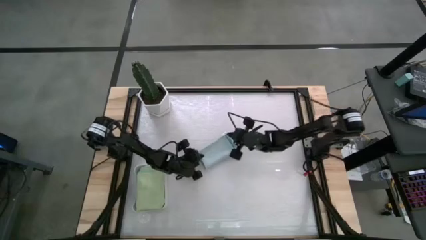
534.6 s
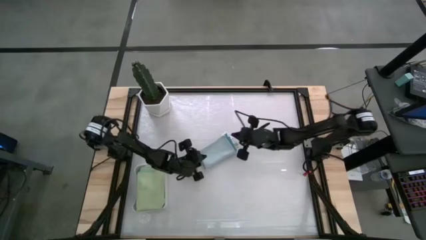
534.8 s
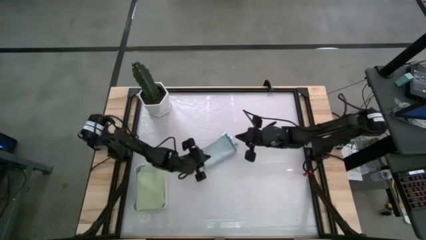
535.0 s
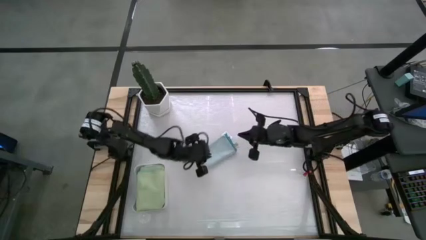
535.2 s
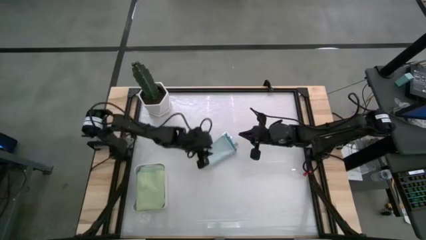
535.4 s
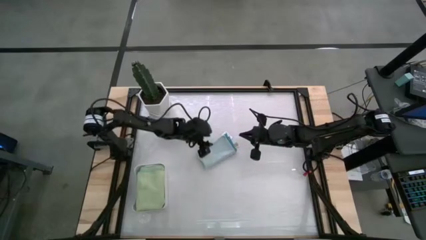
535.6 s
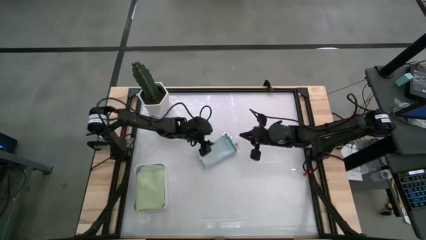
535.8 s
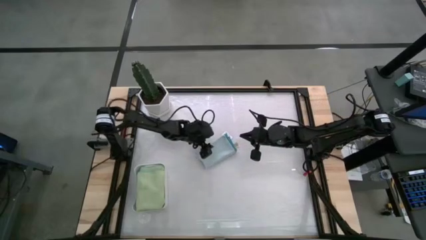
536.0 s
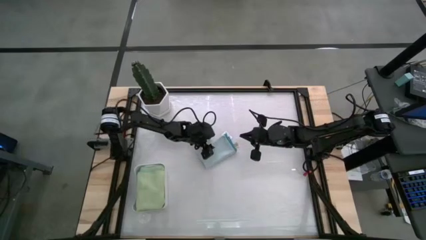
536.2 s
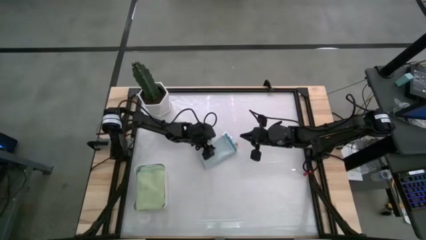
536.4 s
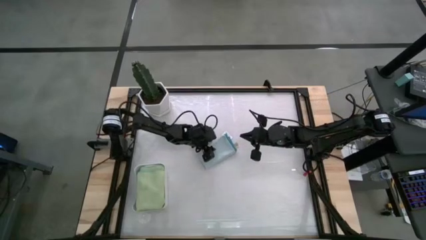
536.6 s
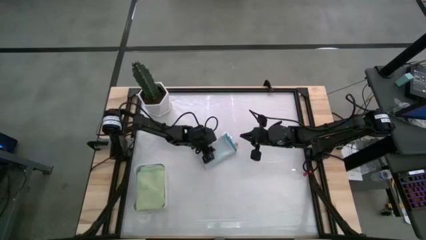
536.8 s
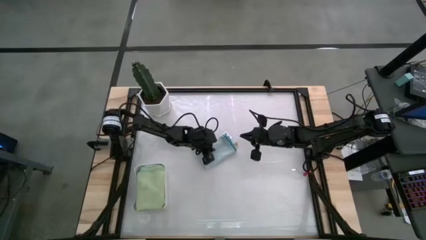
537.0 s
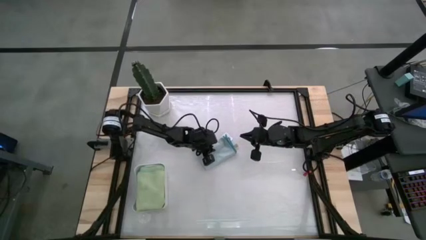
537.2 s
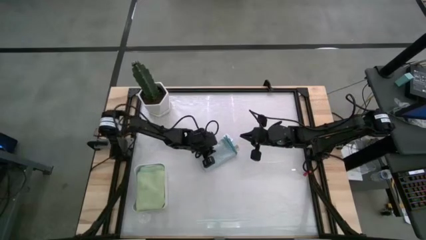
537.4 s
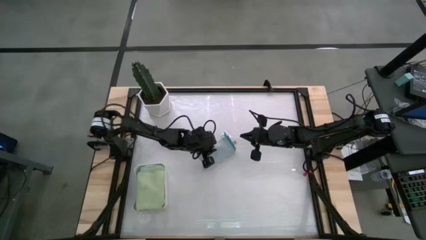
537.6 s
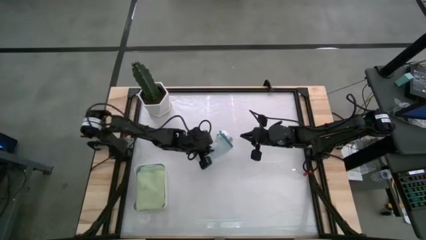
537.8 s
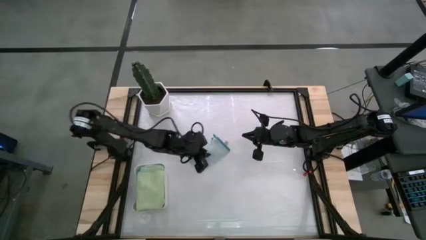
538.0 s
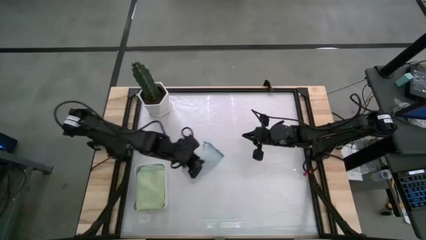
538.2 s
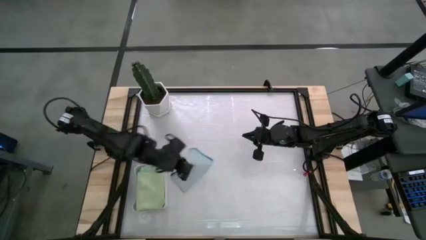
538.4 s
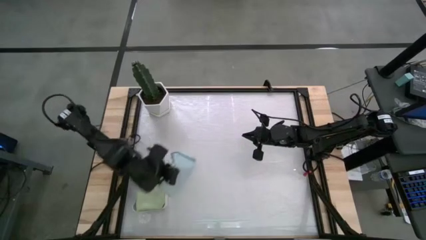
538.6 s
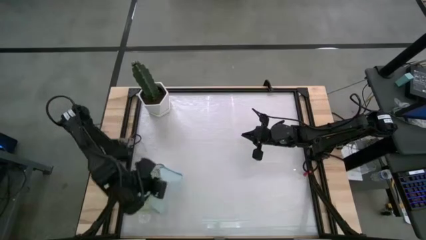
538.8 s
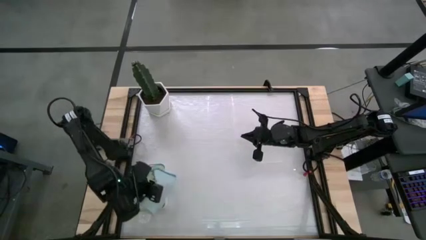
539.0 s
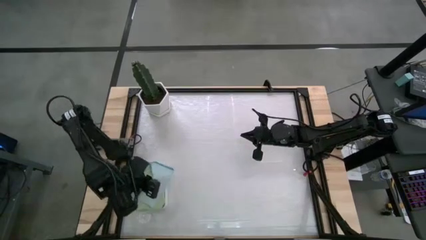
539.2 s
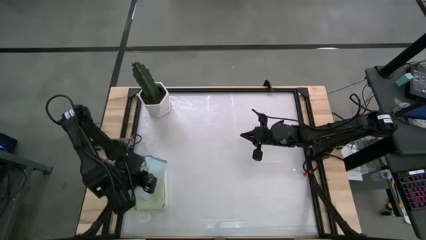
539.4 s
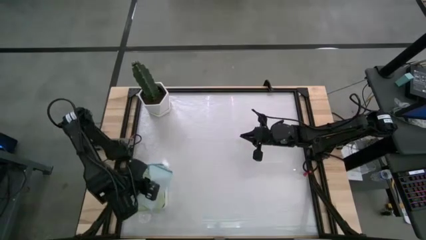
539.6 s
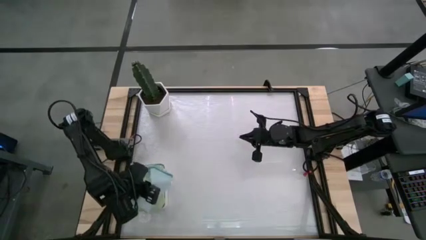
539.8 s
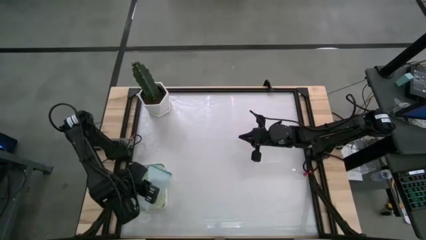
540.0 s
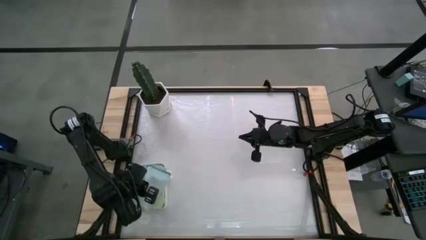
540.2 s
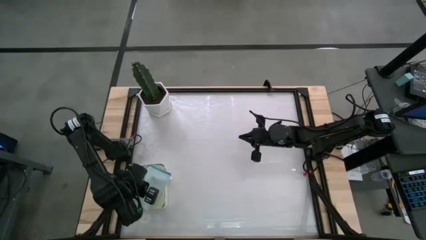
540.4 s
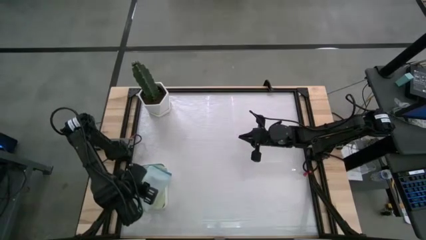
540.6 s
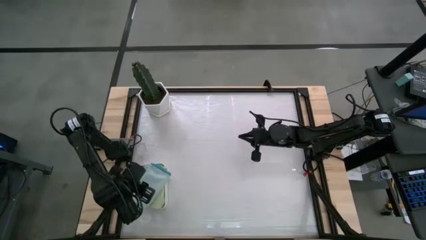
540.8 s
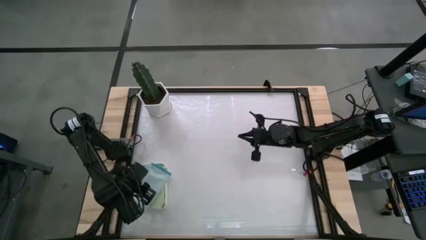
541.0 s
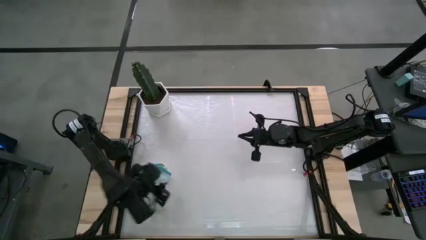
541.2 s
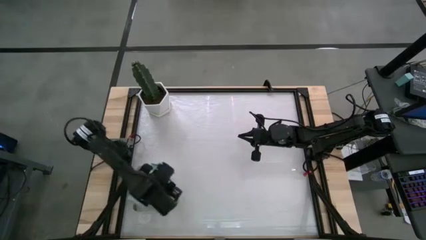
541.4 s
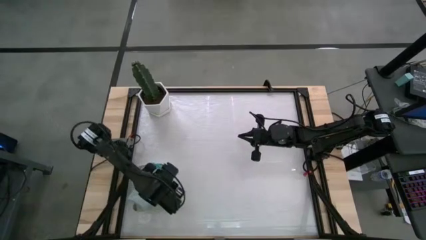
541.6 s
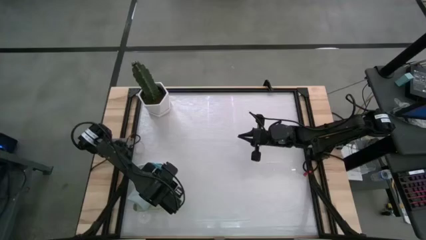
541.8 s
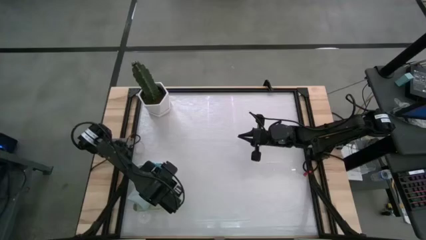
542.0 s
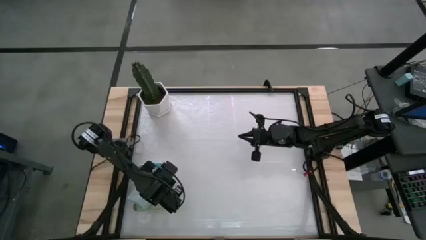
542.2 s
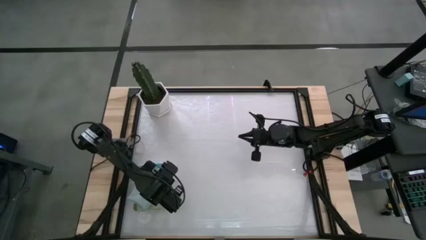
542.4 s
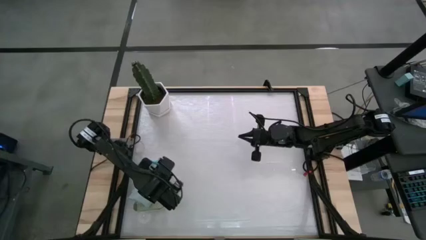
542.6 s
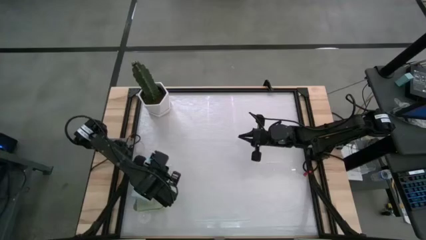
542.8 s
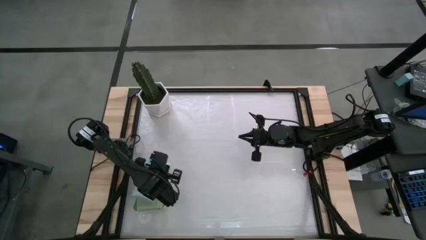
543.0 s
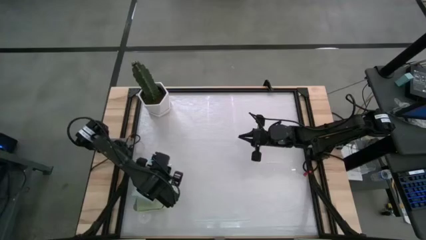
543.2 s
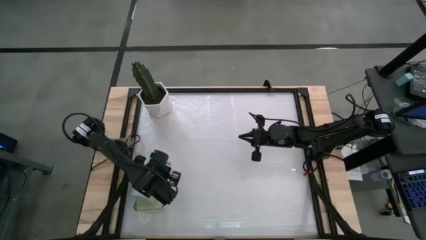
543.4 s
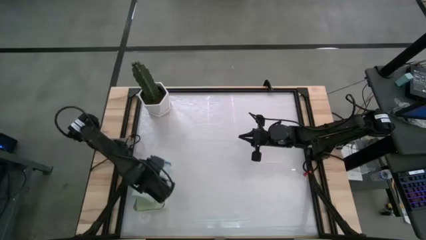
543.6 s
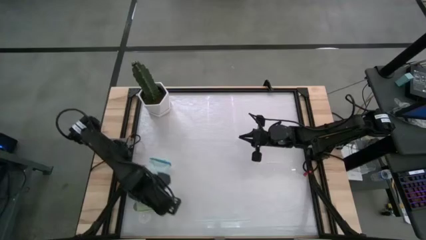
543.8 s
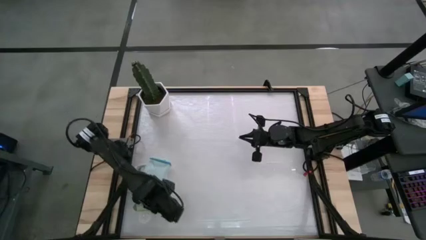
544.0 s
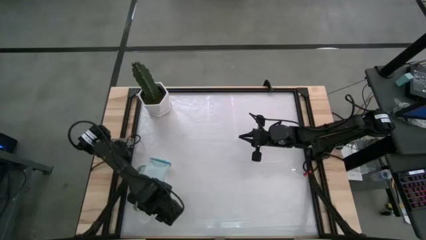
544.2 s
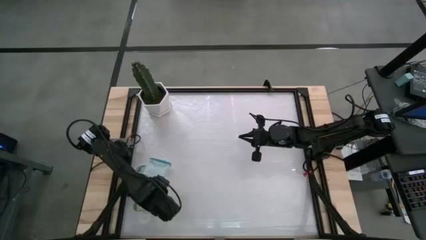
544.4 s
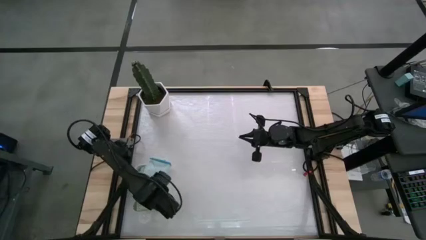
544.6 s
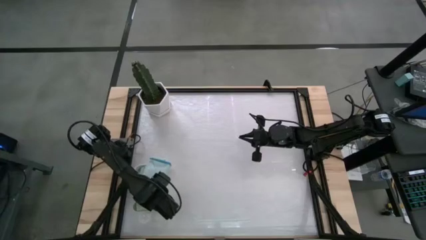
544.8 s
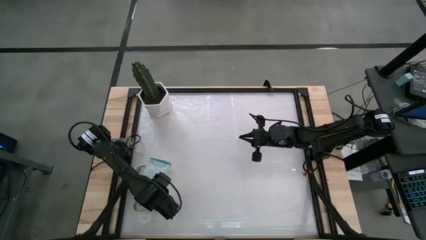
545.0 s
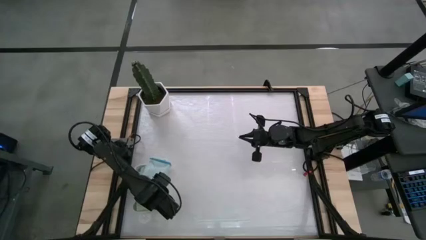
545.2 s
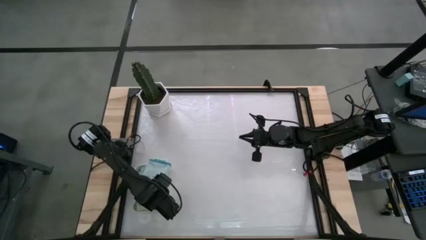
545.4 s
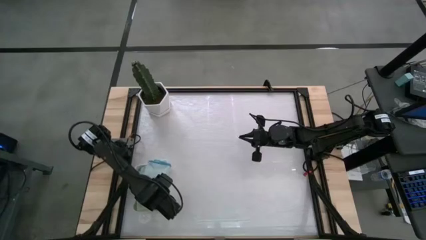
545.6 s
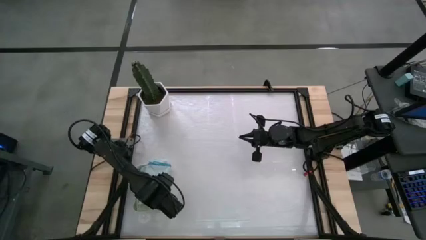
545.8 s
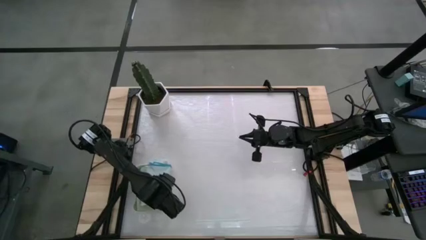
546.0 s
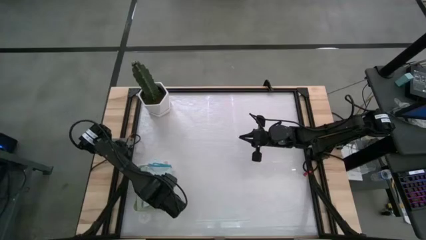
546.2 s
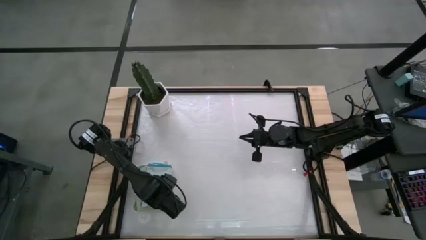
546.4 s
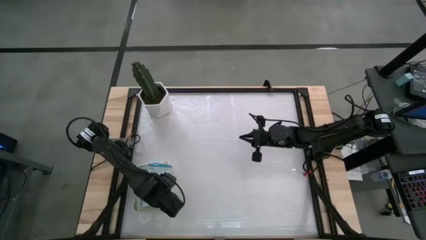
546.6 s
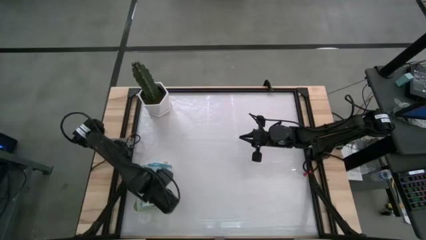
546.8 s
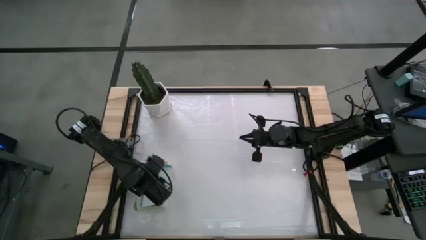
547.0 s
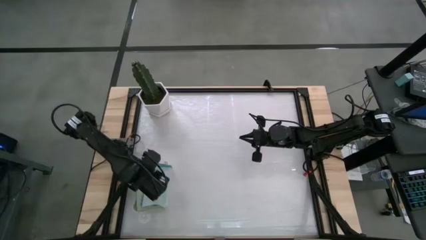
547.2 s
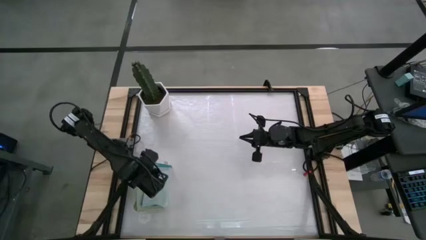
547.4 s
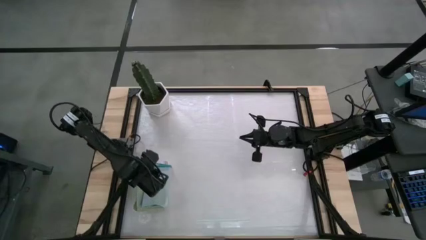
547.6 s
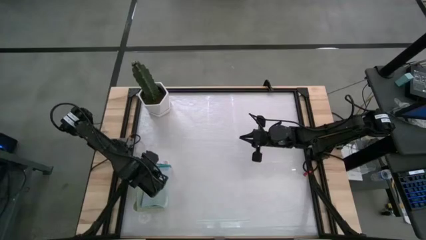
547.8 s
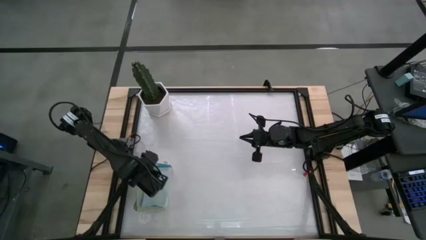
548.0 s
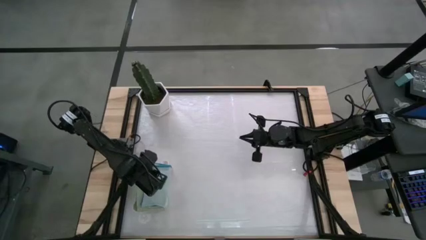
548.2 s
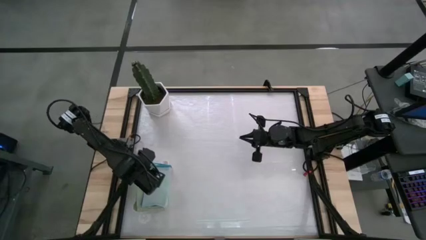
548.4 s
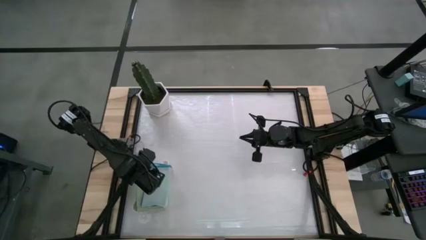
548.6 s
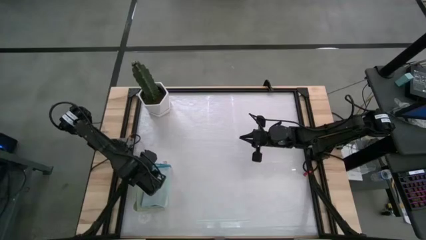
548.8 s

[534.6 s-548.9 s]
Task: Fold microfiber towels
Put the light blue microfiber towel into the white bin

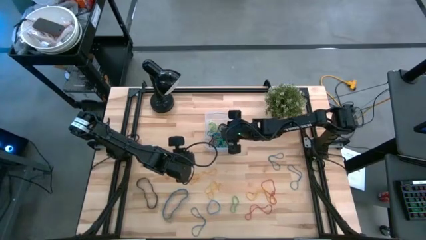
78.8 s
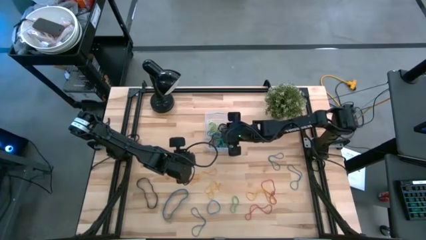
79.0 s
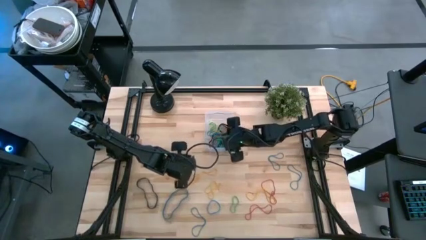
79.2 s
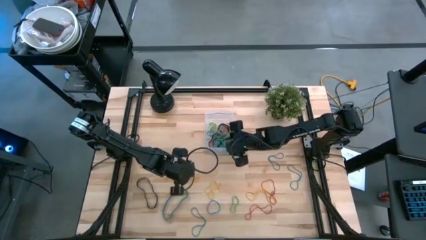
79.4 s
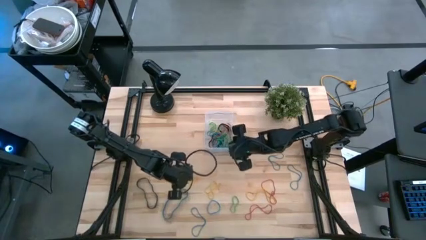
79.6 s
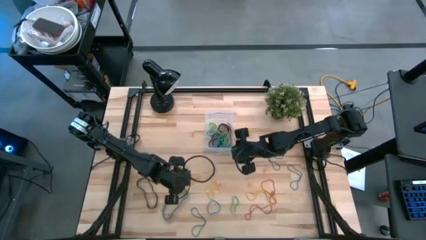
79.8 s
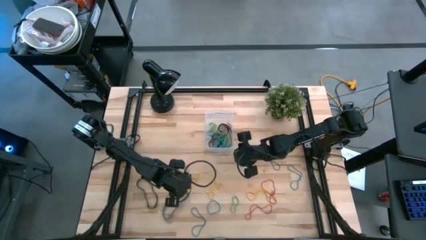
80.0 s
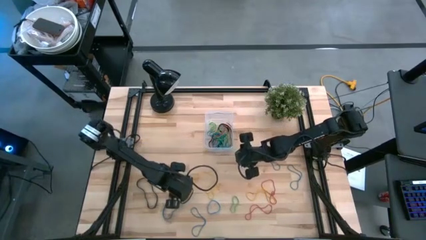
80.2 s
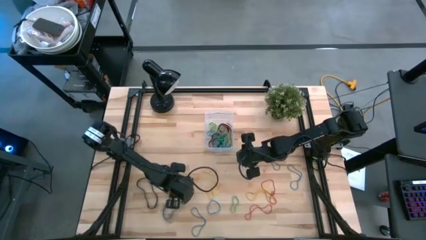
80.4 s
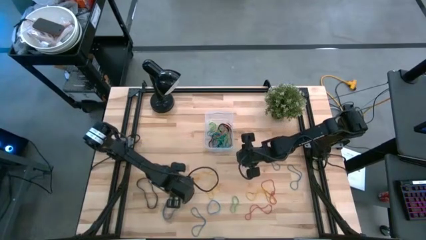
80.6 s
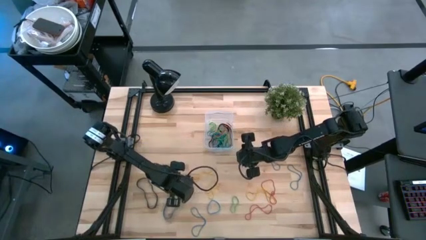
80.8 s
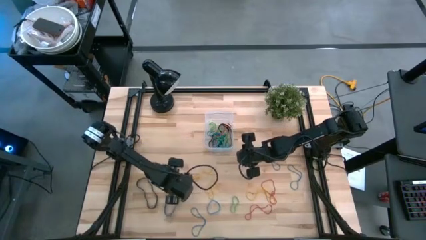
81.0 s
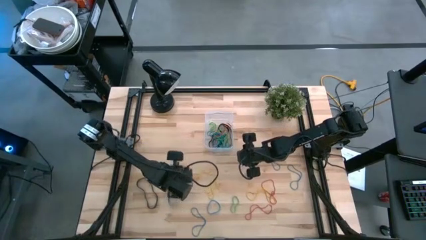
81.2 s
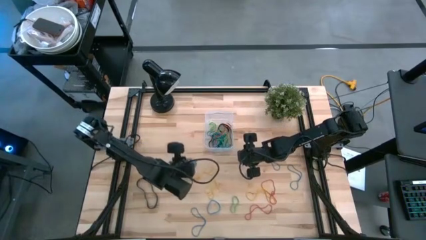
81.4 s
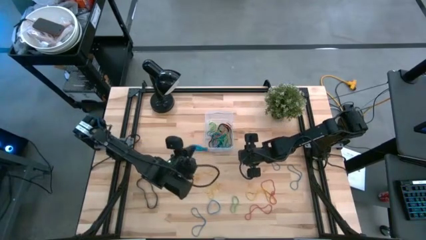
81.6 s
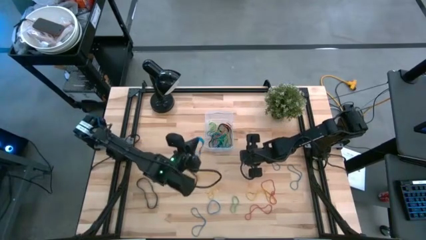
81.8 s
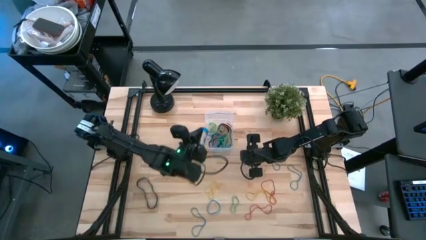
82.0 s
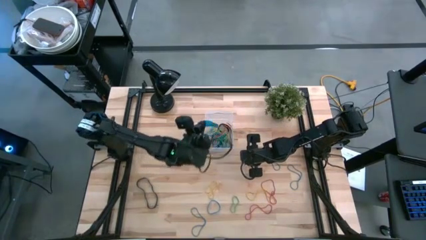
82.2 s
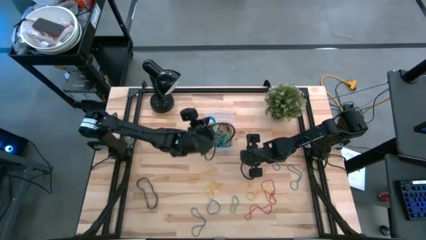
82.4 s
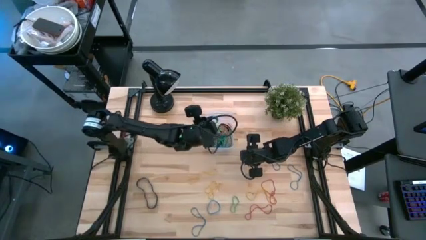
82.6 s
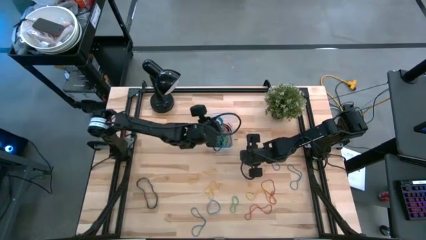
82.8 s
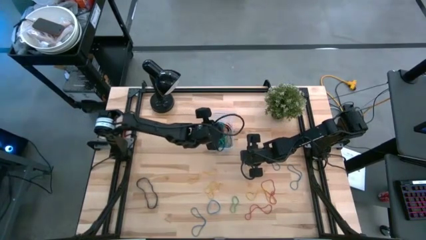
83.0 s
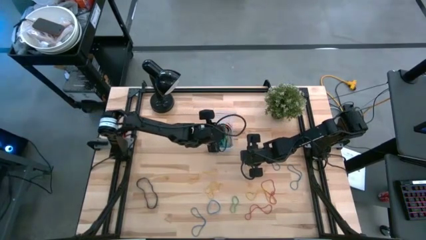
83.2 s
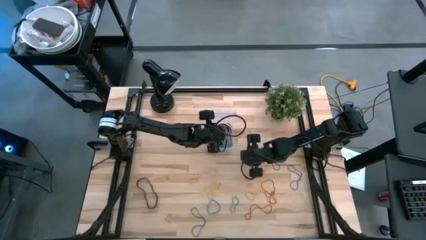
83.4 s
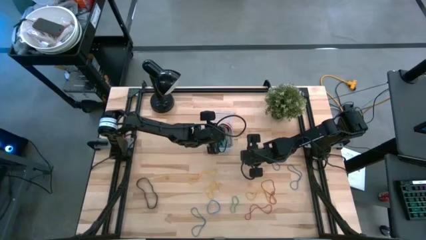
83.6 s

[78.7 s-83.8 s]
Task: Pick and place rubber bands into bin
Put blue rubberband into the transparent bin
